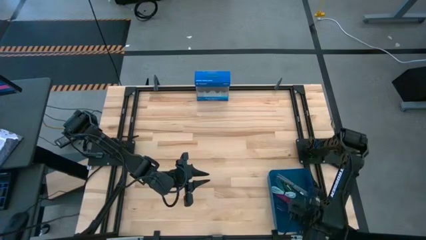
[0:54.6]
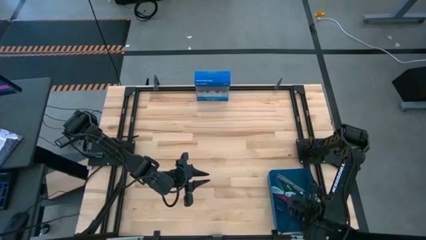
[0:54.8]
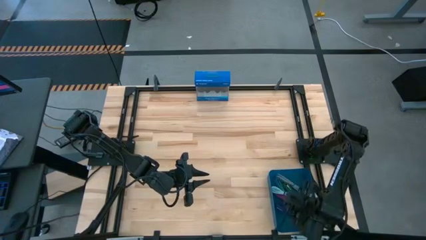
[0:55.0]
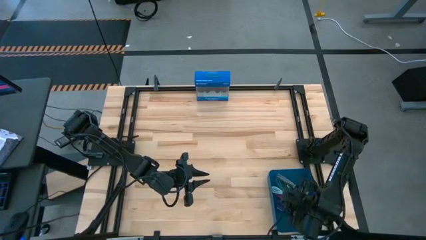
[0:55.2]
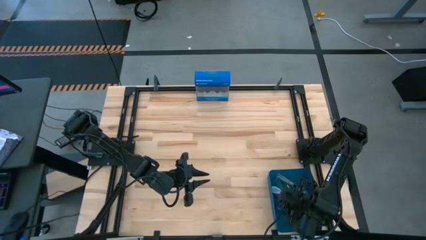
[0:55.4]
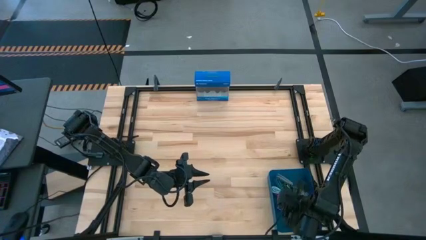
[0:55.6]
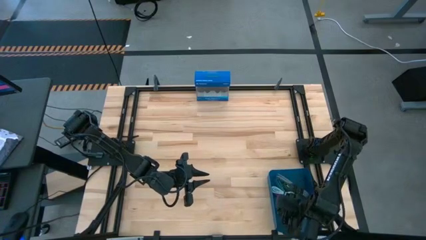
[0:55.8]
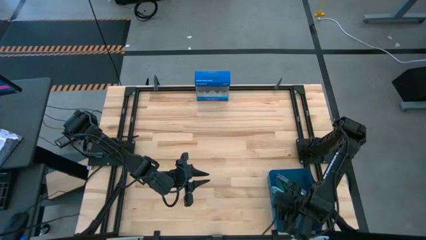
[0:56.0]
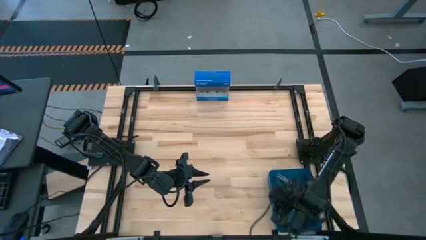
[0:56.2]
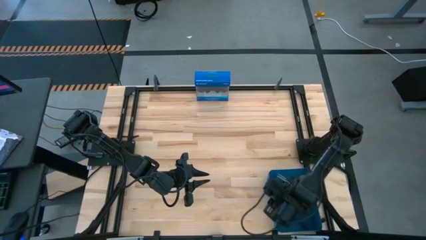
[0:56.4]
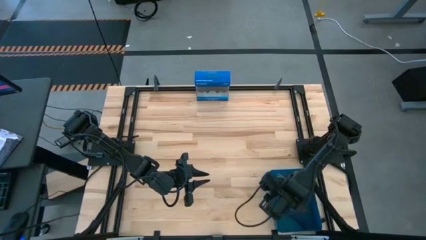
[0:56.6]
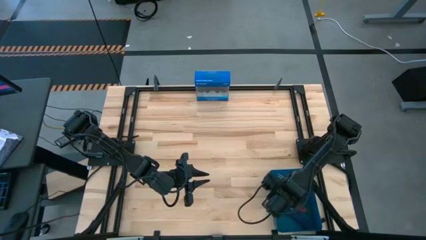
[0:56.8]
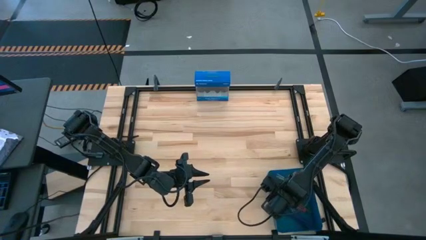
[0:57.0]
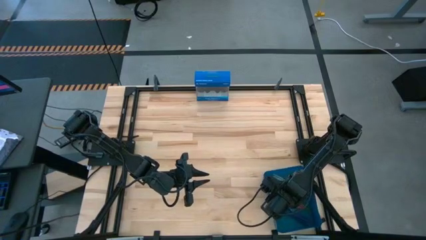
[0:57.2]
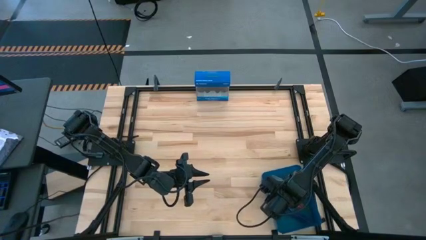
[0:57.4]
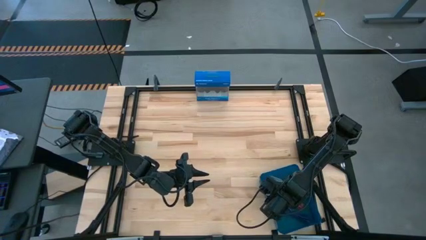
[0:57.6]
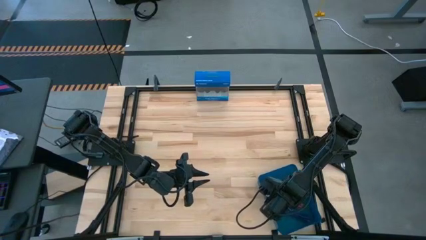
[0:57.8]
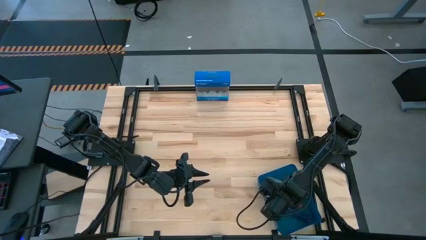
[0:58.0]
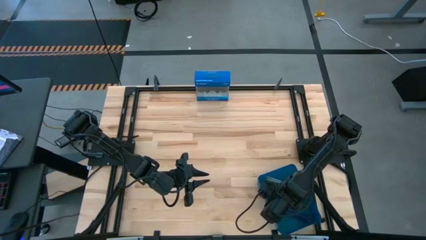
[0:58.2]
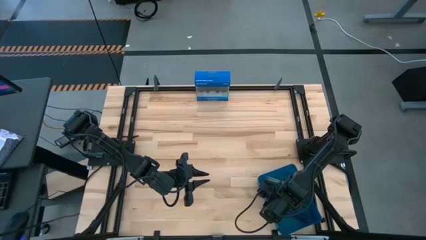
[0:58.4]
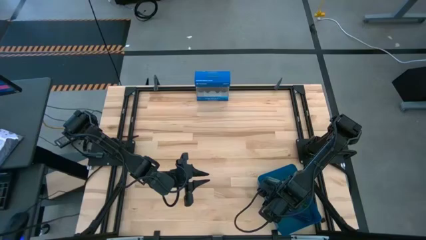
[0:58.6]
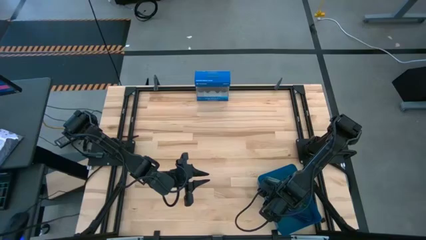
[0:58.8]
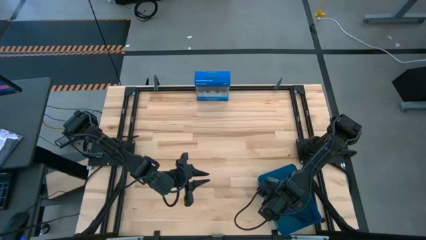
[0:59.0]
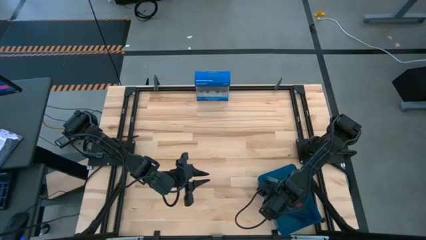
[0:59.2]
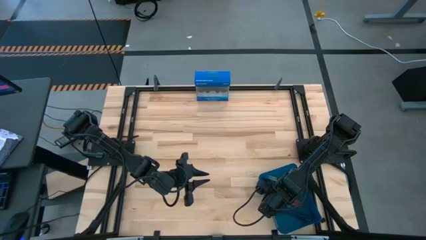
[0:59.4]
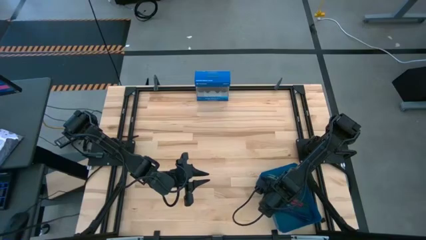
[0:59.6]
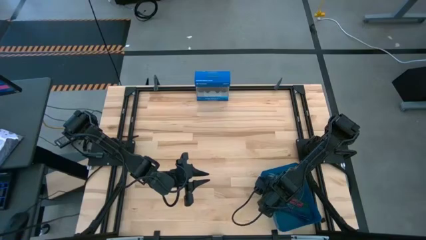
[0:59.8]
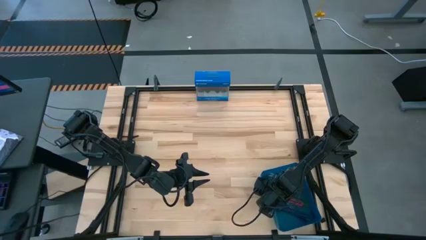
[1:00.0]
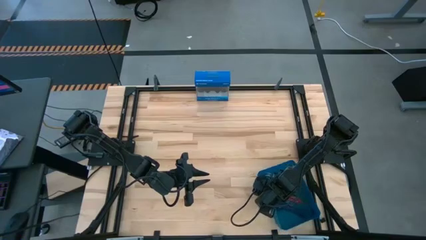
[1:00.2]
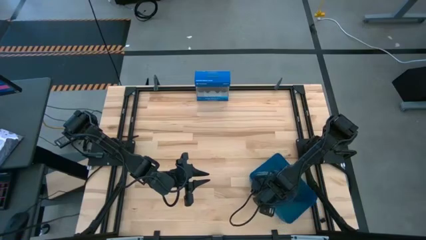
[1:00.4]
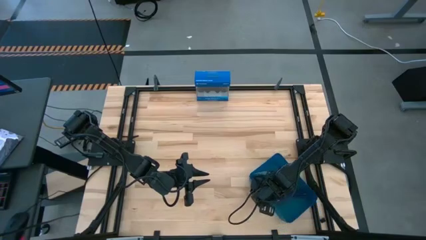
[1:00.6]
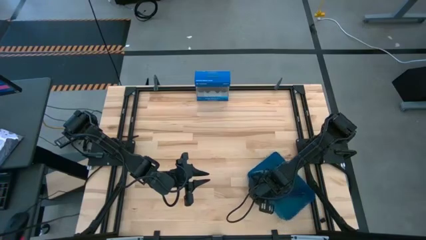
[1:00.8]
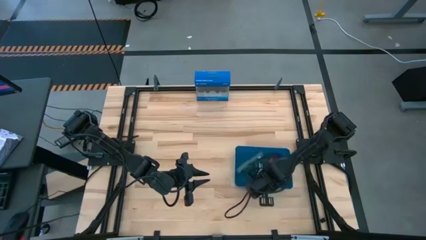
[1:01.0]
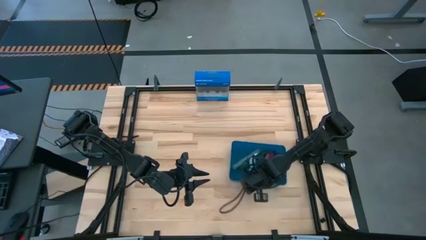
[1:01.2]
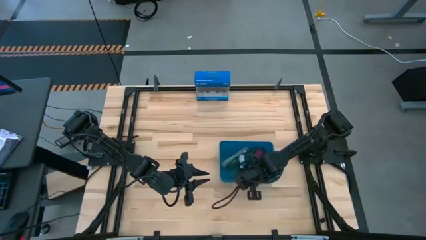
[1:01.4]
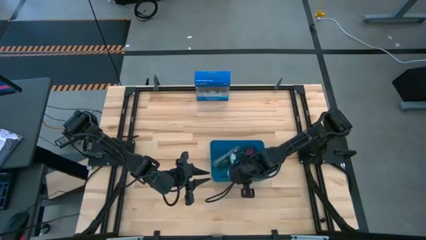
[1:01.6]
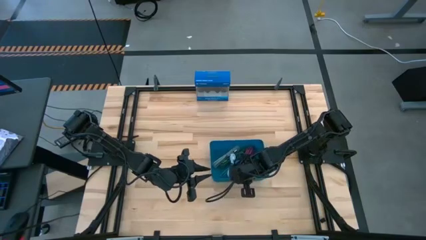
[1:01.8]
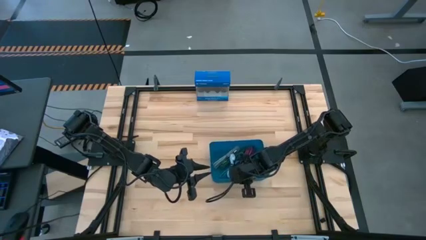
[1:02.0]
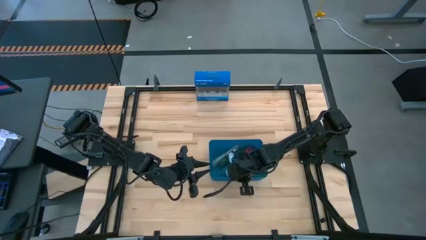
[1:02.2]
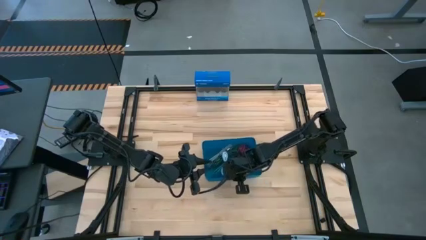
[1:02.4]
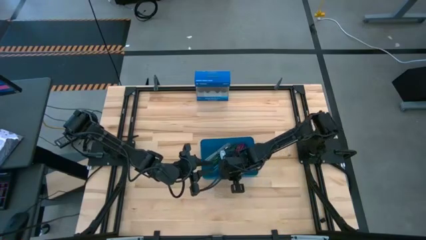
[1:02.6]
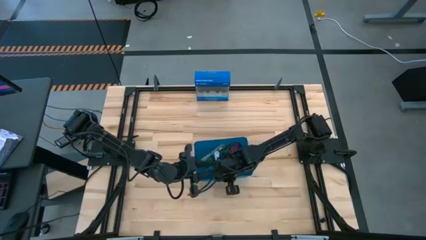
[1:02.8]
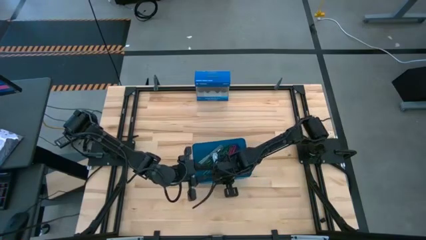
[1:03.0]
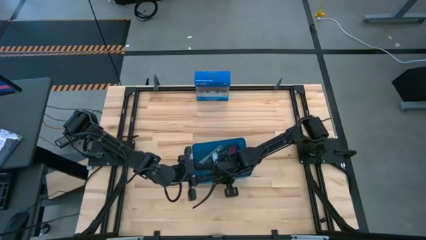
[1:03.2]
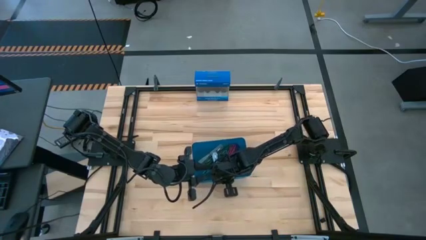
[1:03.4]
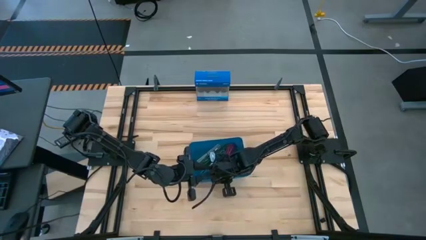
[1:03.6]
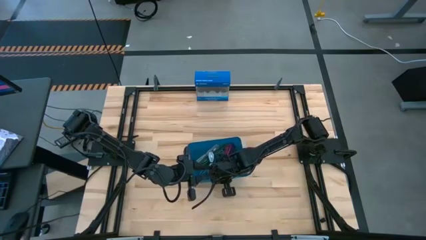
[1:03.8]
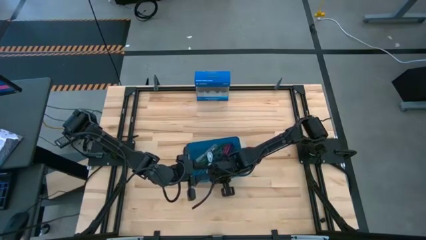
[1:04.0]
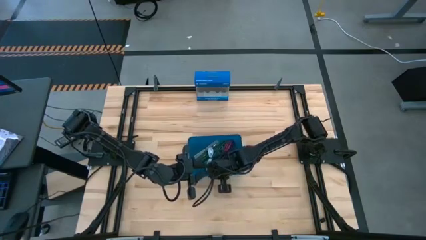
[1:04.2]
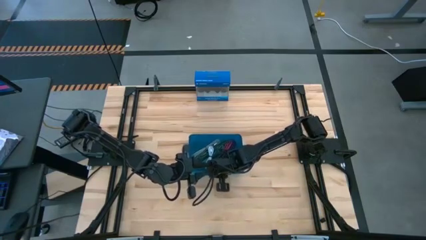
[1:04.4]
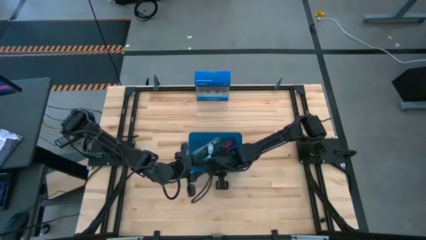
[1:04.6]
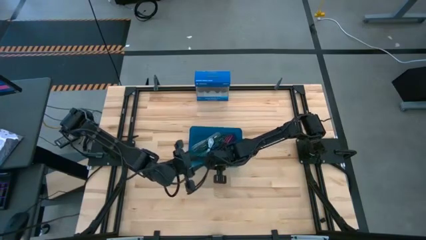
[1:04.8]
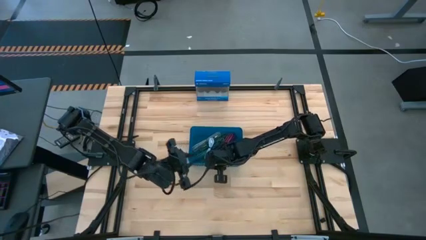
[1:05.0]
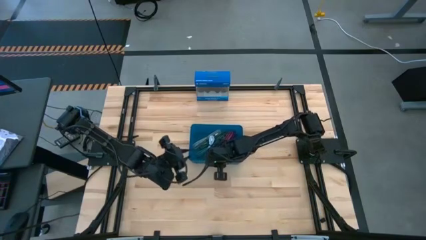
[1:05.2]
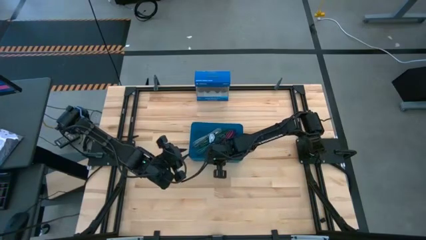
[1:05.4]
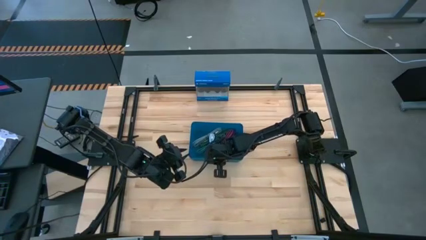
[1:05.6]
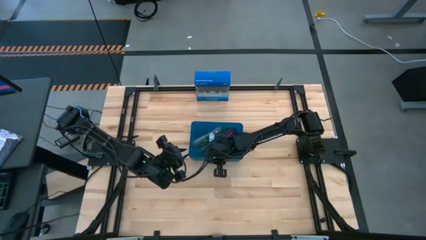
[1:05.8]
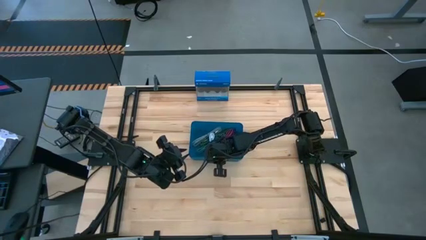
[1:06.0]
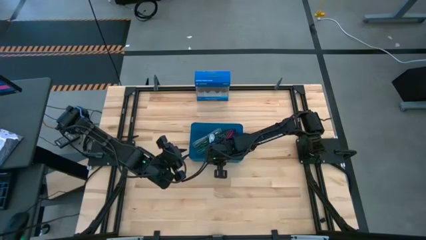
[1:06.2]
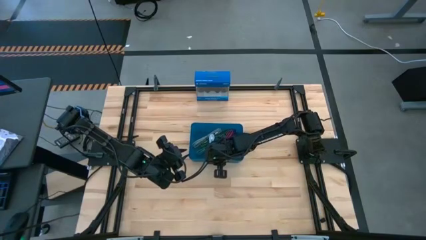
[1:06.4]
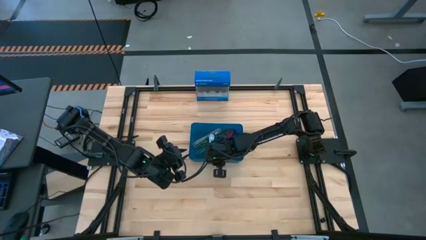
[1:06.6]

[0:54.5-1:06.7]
Task: Pick and place USB-C Cables
Move the blue bin to the center of the table

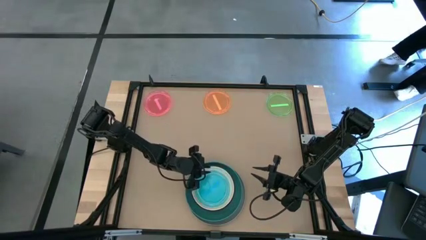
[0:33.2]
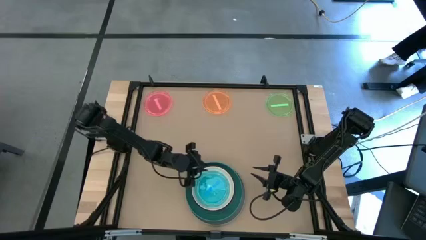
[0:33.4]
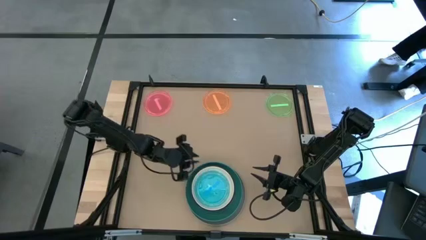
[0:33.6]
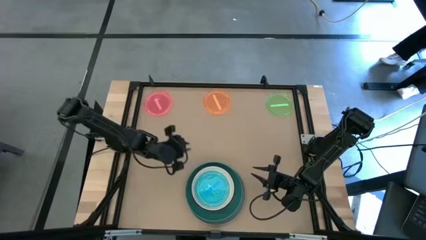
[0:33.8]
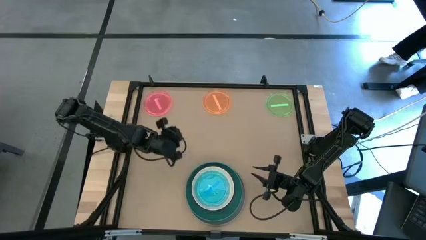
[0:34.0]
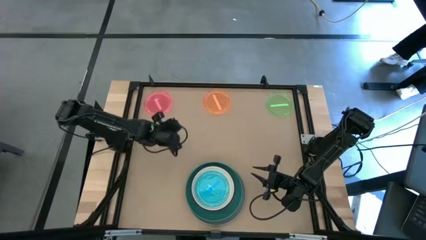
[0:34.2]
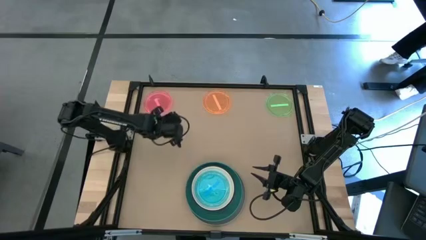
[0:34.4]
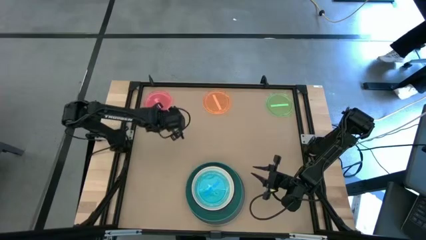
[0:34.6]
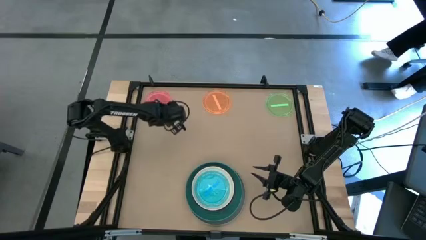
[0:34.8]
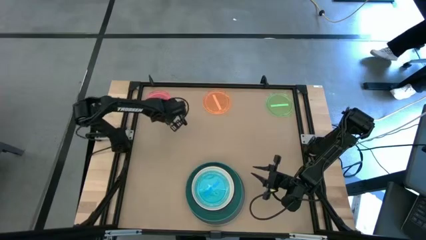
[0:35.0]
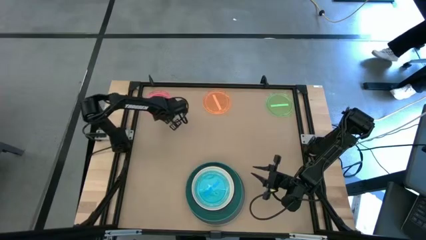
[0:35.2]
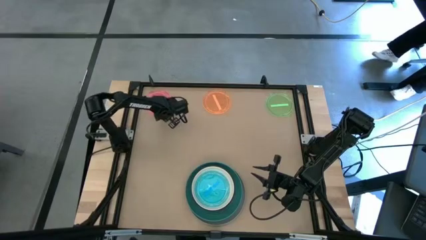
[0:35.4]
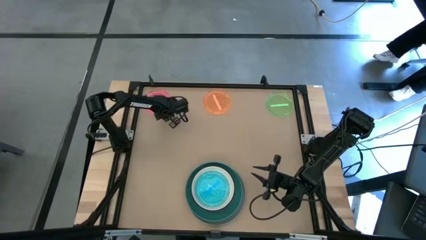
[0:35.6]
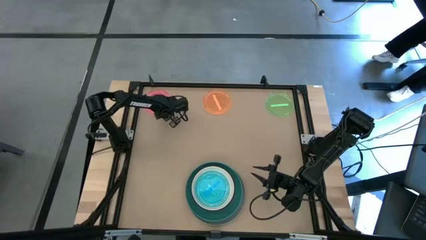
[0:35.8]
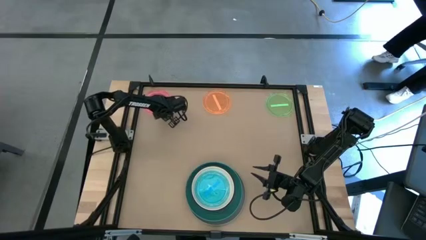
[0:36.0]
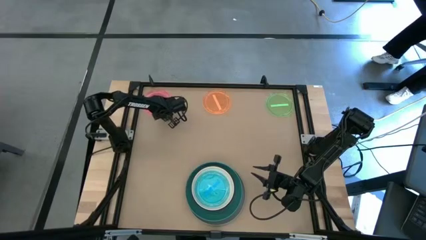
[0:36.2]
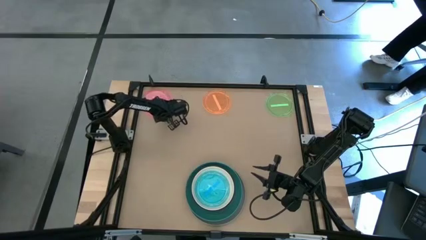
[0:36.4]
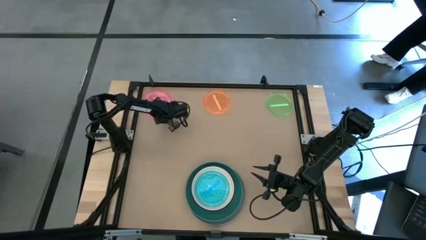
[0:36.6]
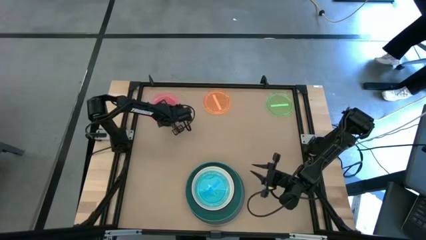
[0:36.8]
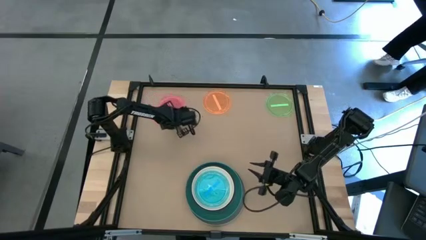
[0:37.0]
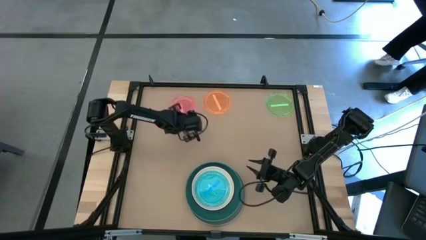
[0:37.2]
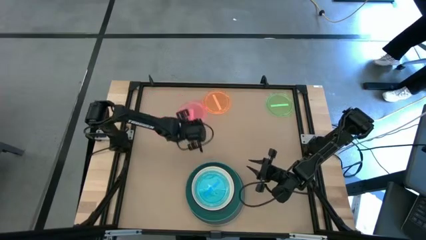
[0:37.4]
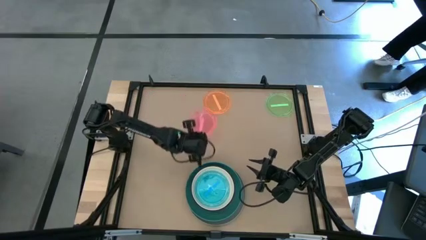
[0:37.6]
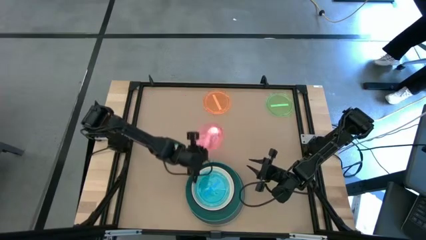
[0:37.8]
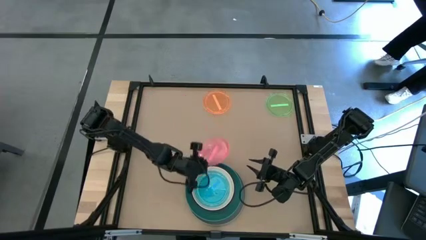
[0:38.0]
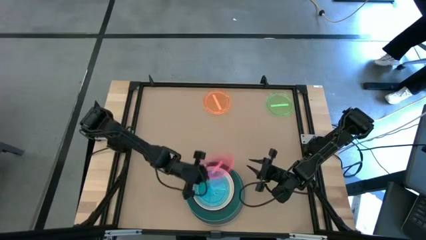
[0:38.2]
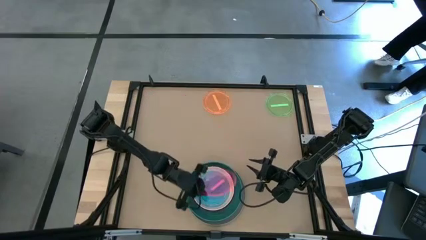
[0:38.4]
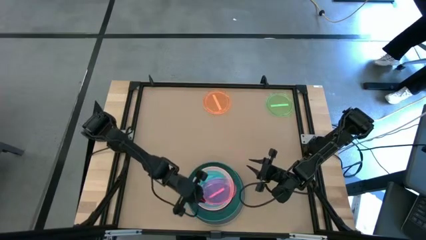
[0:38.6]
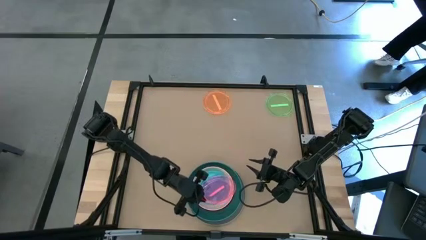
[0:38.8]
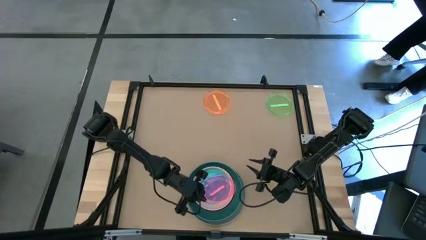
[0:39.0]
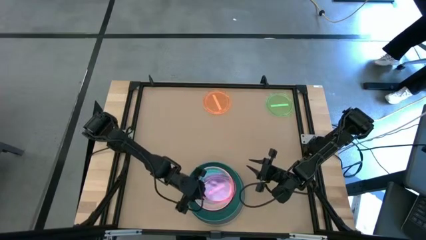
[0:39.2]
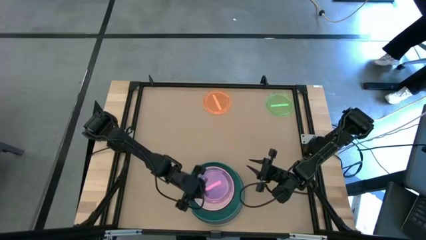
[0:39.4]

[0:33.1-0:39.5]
Task: Stack plastic plates
Stack the pink transparent plate on top of the blue transparent plate
